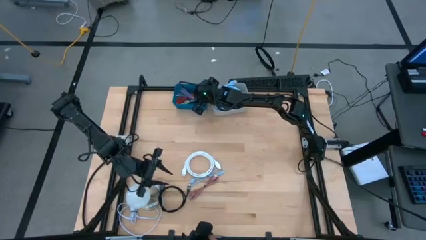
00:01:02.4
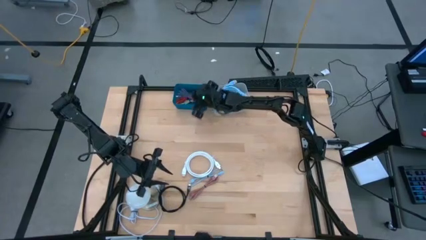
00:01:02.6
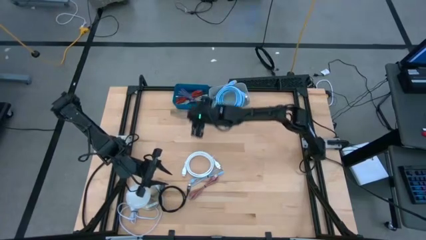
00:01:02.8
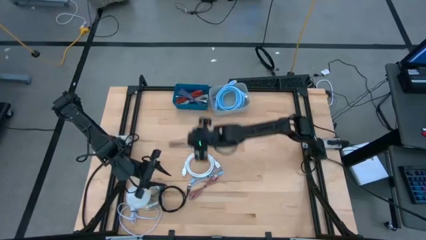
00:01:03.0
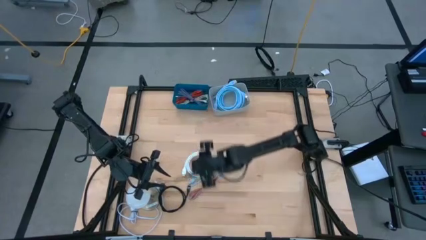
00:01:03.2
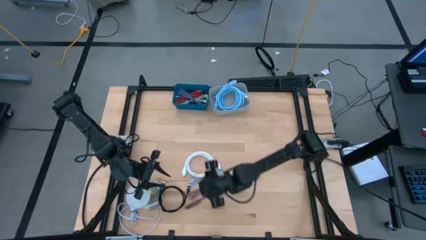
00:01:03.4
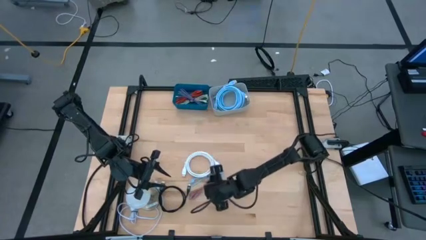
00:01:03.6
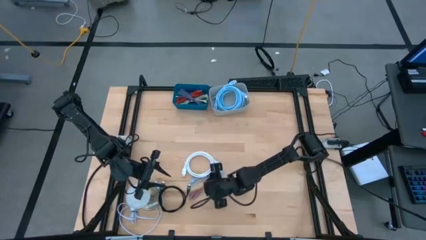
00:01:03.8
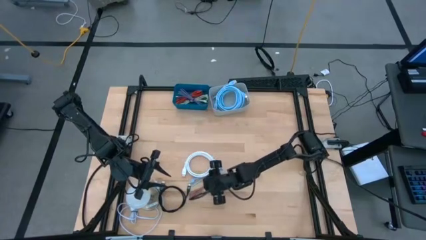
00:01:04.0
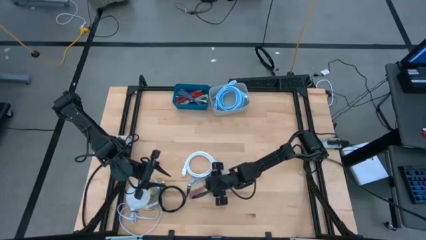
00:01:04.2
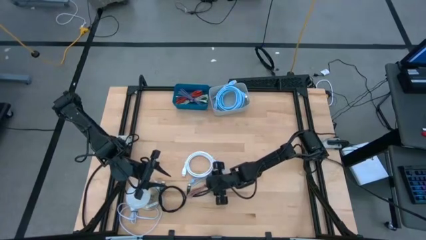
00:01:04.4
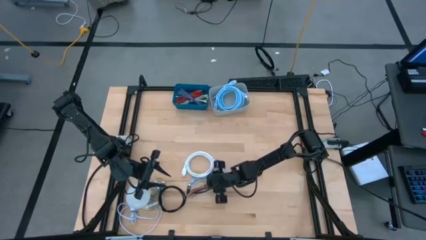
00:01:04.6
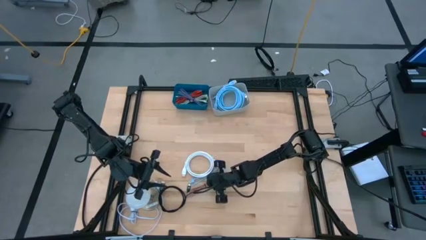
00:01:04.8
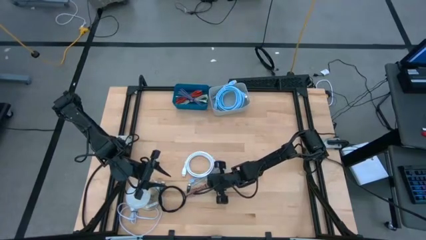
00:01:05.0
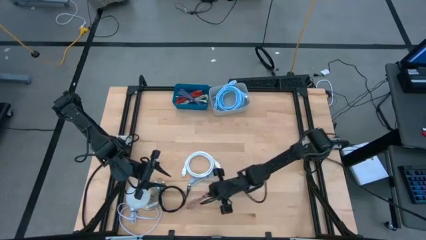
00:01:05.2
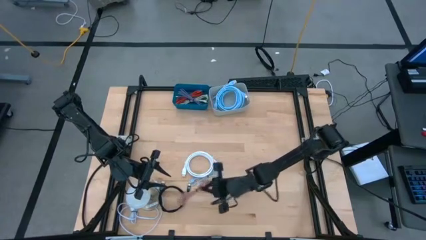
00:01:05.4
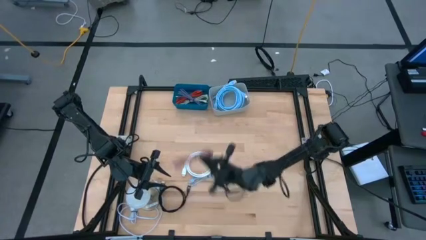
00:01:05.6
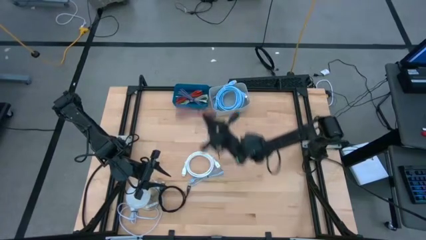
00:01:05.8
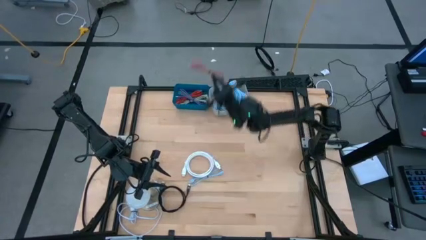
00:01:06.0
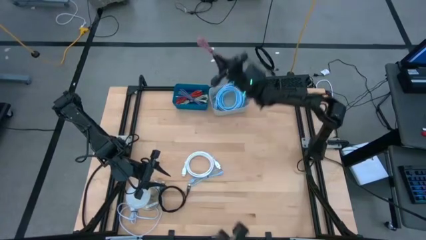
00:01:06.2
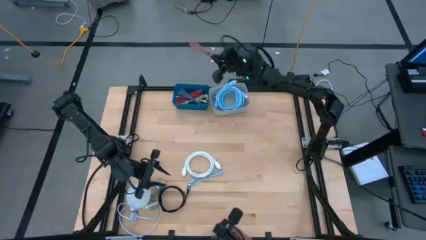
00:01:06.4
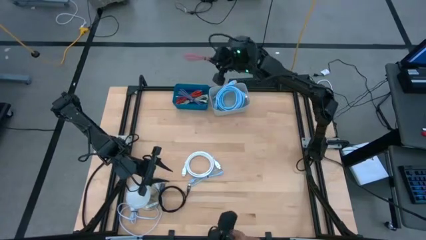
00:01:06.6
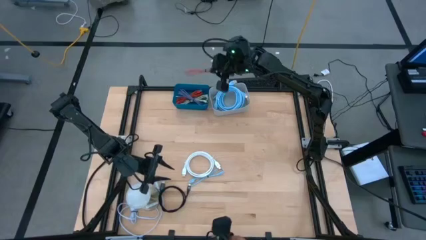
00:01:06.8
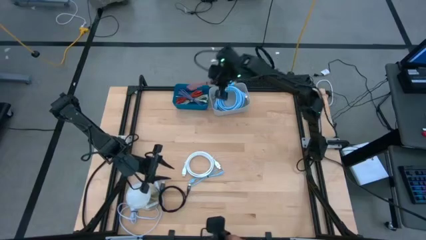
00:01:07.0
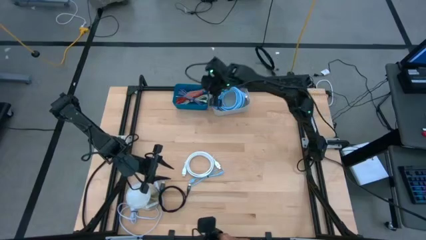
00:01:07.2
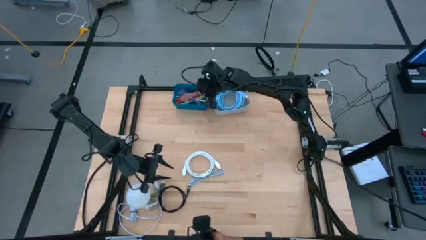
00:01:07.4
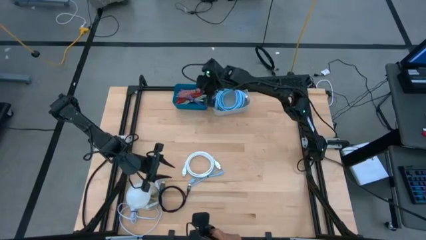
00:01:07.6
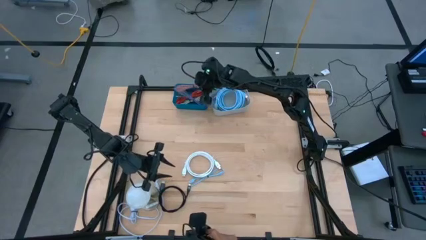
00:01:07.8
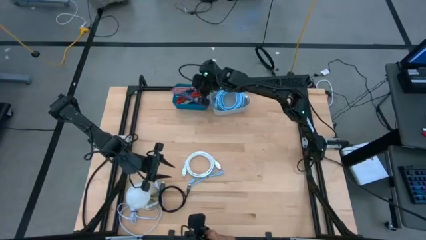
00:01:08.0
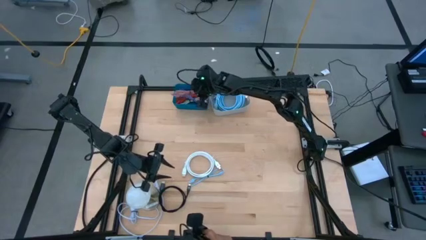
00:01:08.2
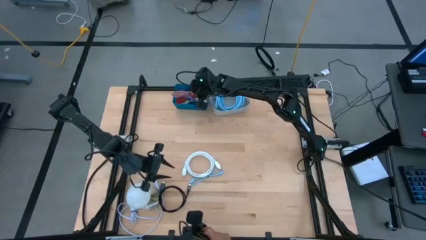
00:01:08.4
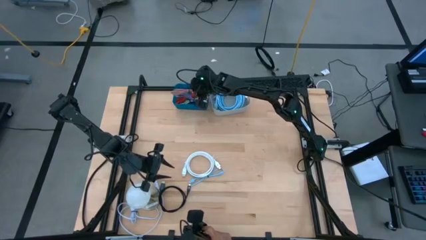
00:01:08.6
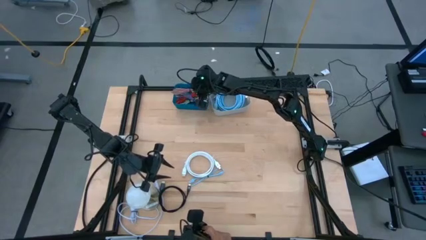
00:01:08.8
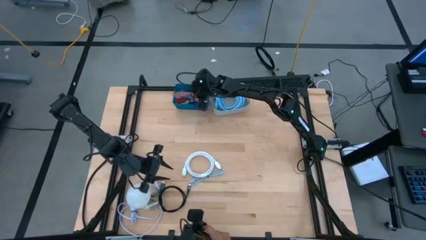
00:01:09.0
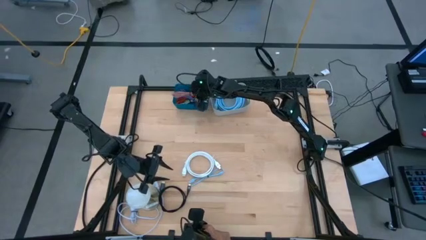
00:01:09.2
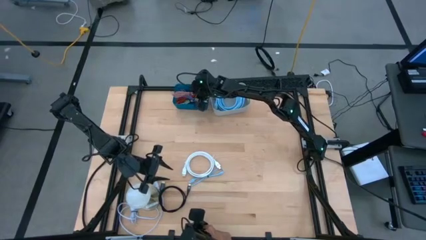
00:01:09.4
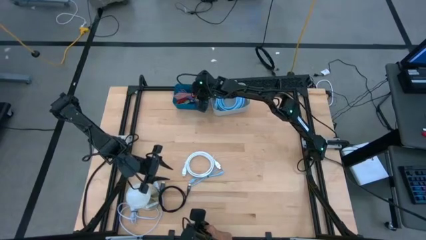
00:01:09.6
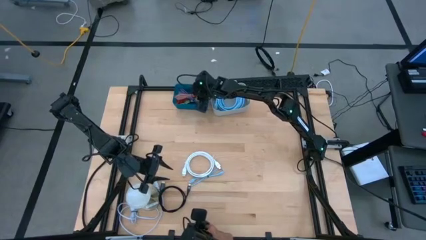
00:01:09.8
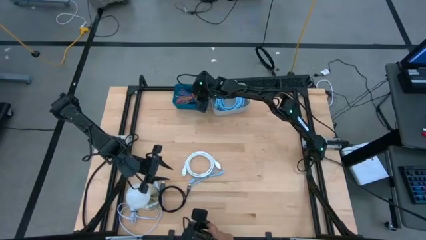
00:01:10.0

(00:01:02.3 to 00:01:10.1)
Task: Pick & Place USB Port
Put the pink usb cable into the blue bin

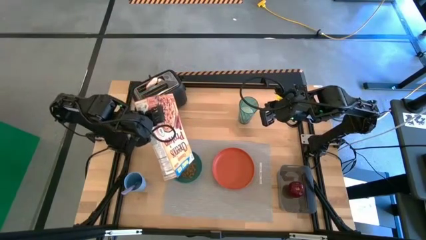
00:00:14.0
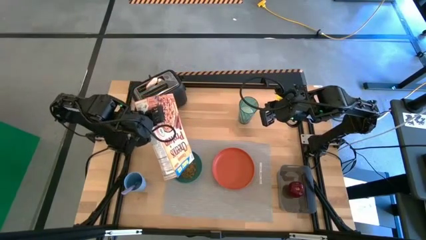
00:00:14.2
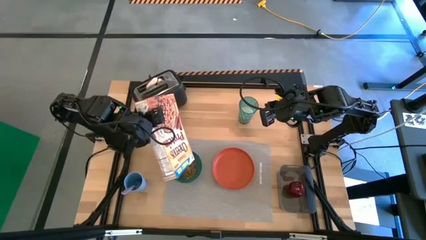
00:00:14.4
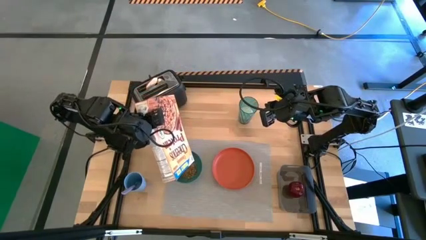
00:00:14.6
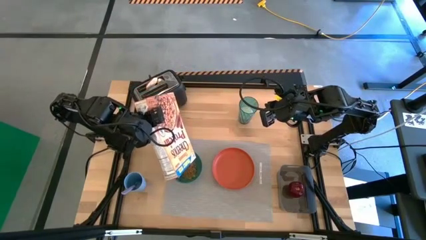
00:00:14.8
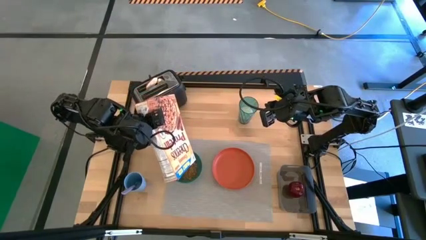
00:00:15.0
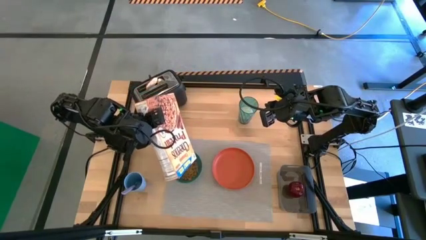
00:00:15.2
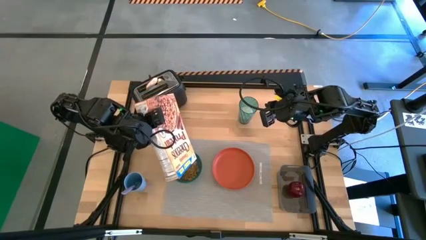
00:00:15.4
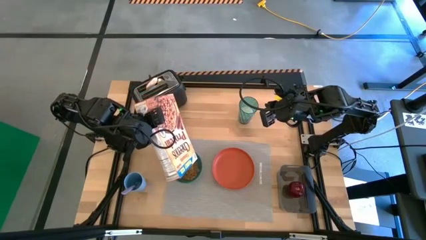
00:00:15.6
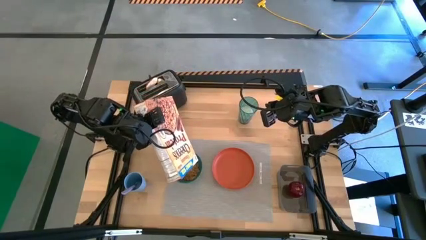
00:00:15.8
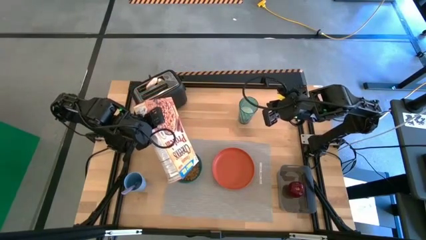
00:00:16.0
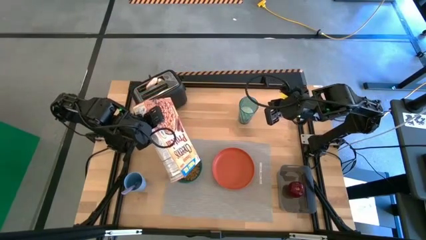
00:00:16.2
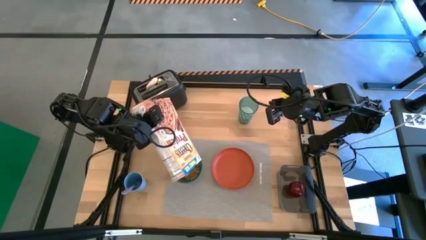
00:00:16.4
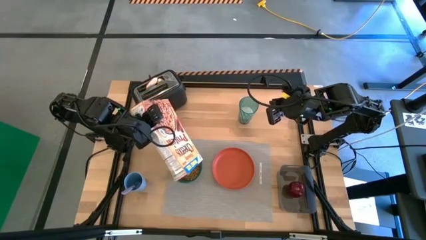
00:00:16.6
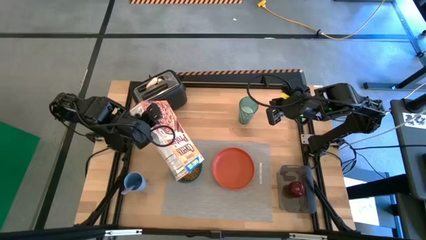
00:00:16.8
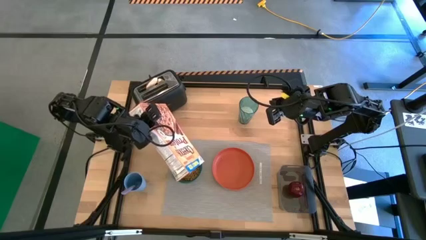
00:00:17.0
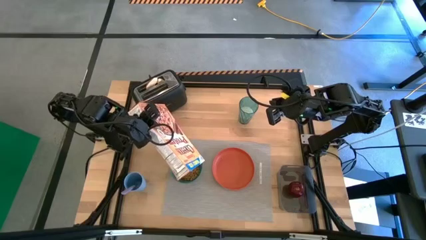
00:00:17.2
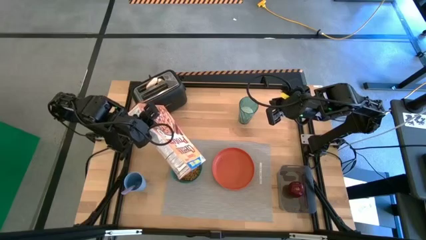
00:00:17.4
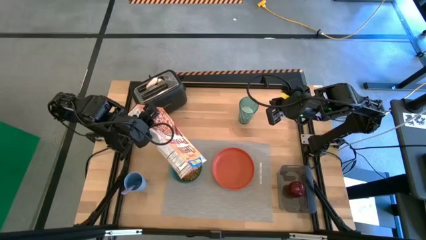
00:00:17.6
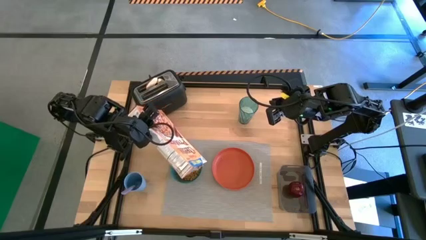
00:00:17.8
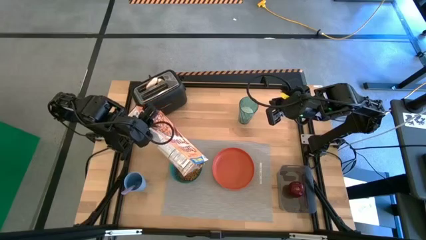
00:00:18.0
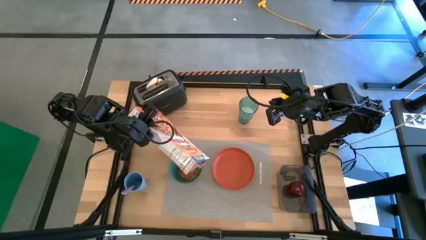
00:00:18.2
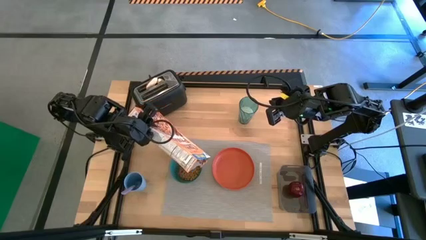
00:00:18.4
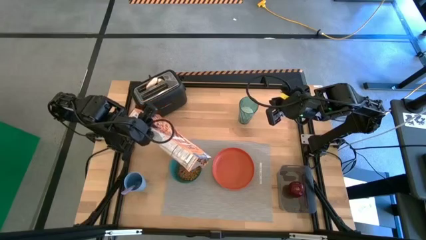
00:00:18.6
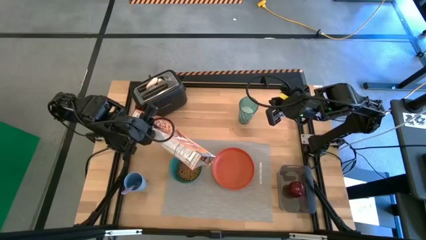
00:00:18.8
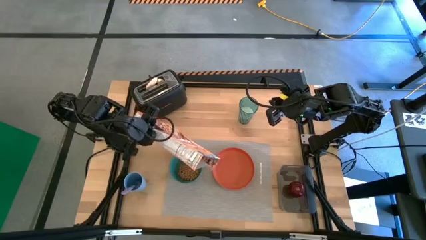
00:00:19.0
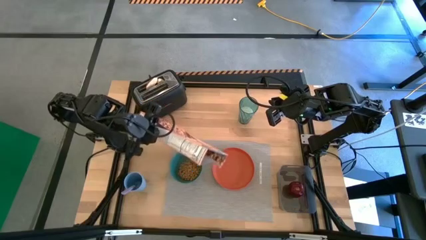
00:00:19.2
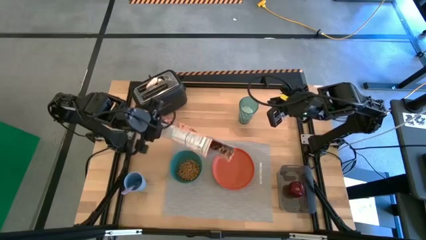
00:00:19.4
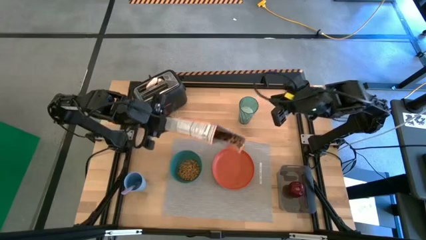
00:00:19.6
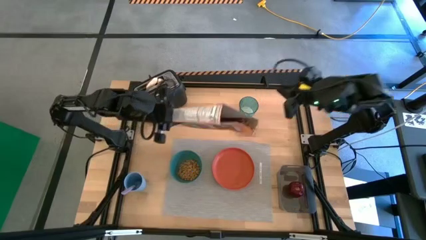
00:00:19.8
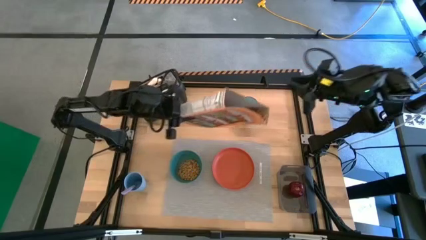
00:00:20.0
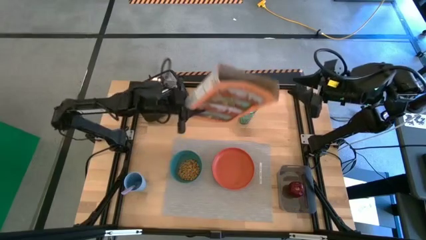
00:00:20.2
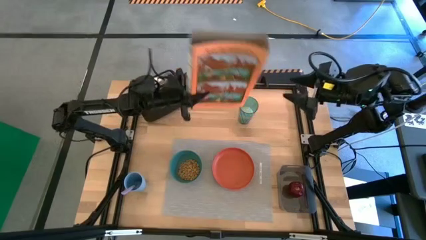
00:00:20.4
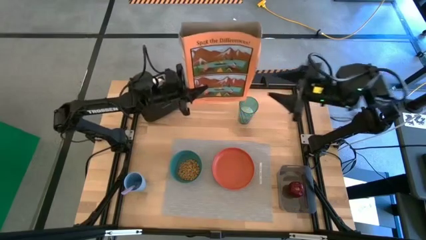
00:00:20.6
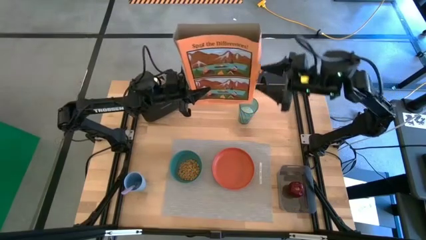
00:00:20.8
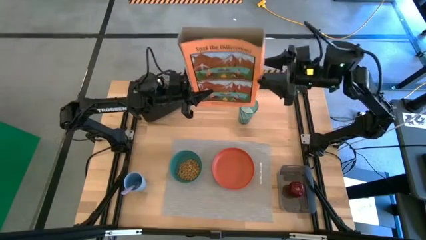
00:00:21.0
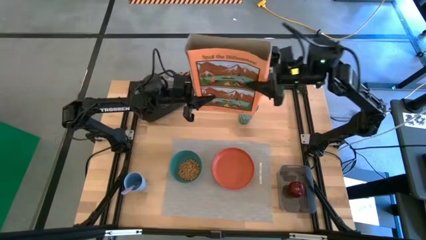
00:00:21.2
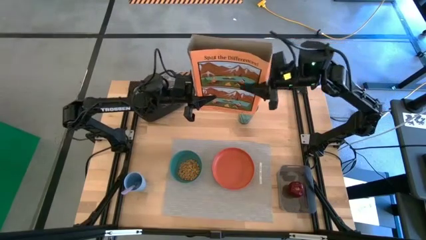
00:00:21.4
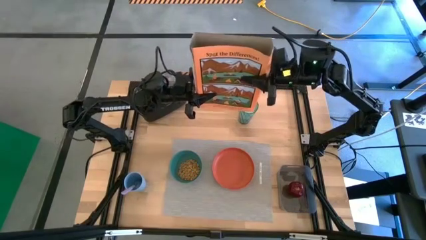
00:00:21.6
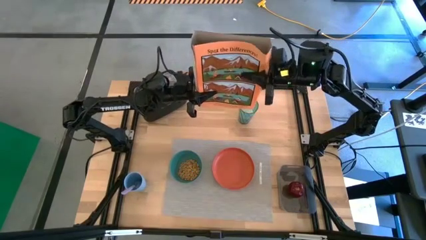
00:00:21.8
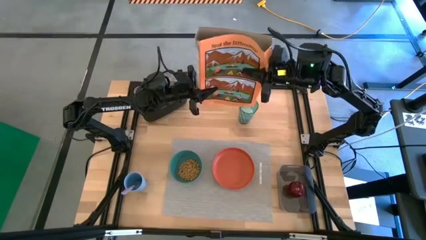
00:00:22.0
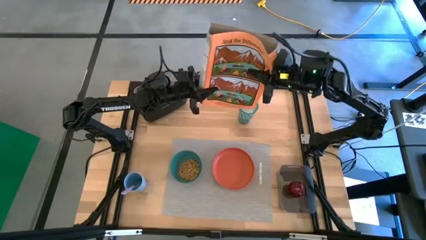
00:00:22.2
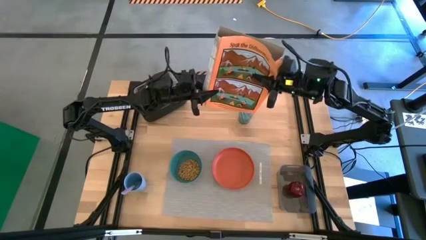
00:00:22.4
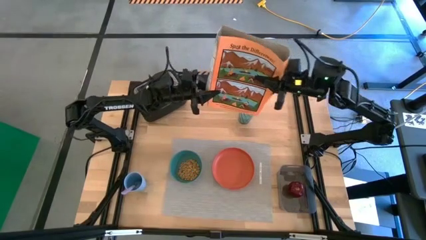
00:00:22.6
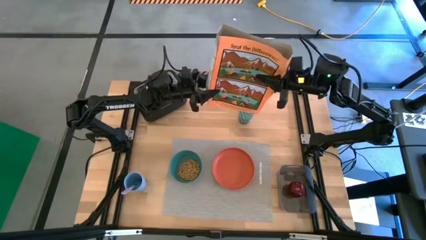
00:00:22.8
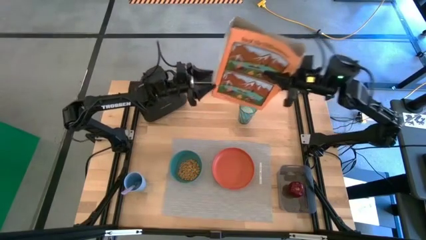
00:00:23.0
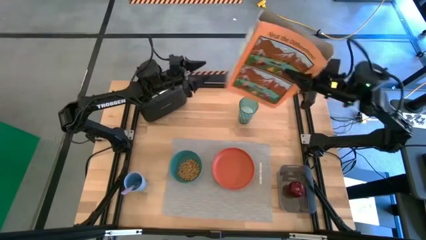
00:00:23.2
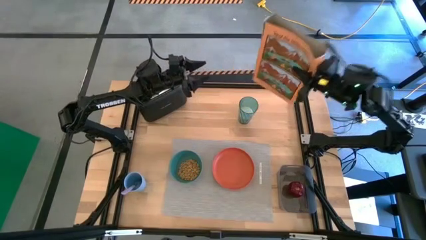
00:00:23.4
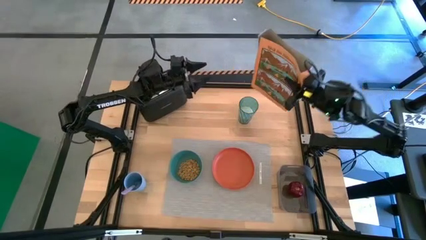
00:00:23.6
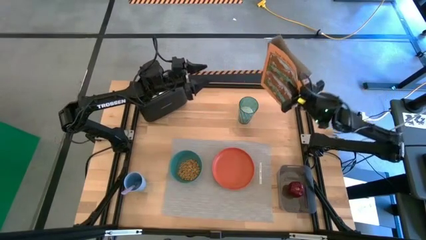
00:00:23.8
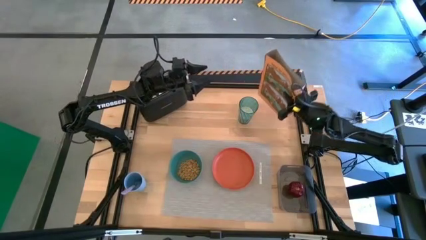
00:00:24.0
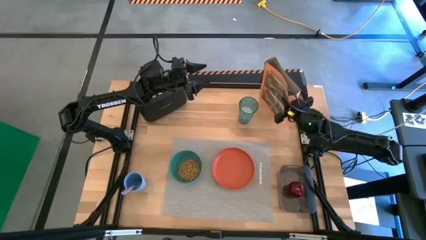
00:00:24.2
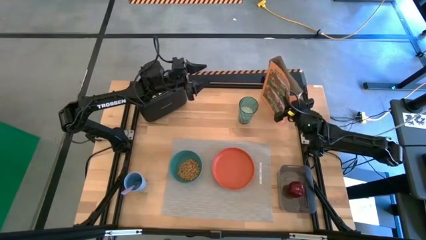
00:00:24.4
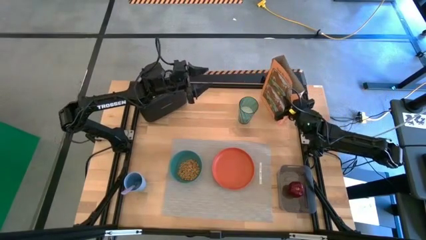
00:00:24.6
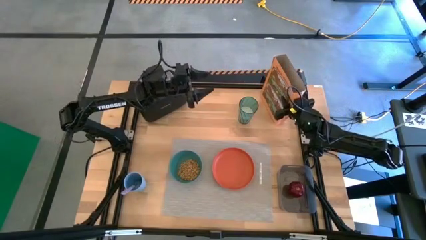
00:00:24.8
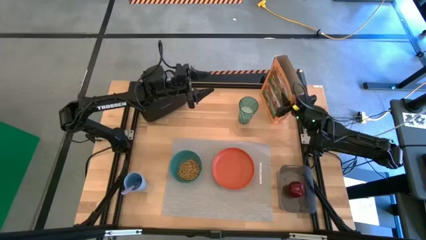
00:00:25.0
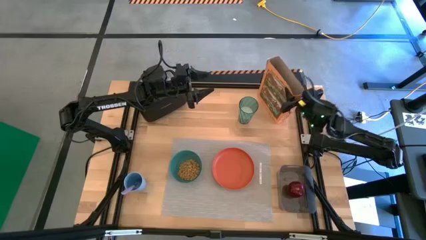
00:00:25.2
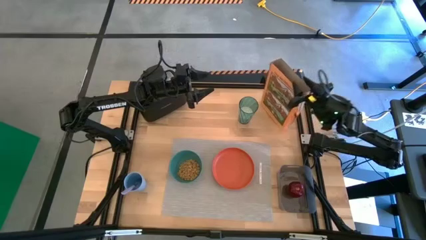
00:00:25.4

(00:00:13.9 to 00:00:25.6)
Task: Arrange a breakfast setting
Pour the cereals into the green bowl
